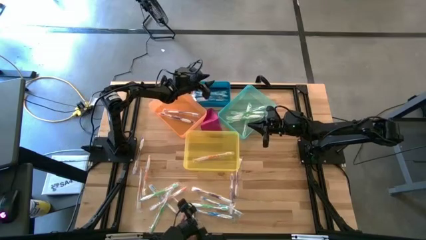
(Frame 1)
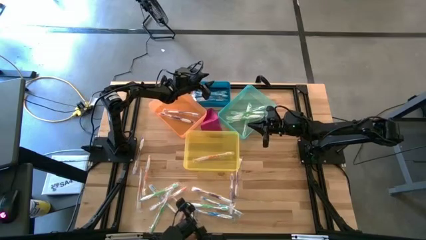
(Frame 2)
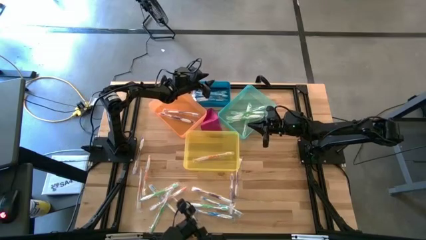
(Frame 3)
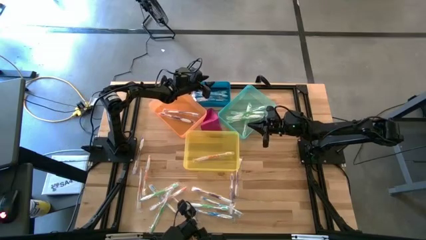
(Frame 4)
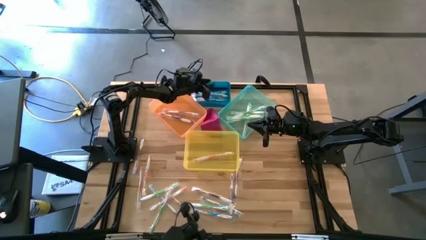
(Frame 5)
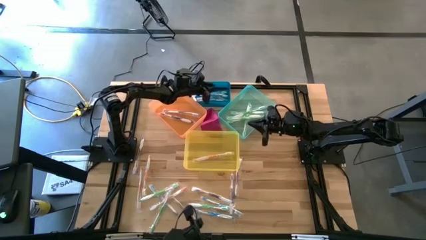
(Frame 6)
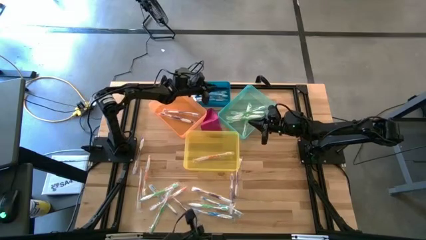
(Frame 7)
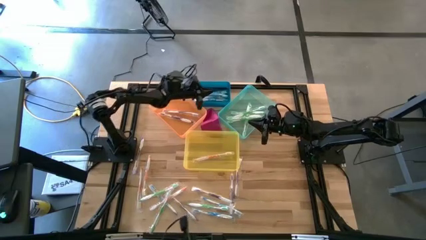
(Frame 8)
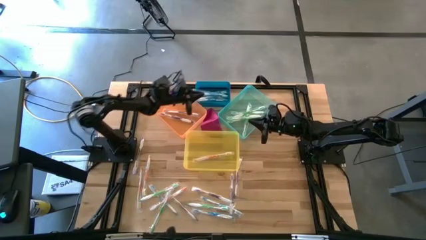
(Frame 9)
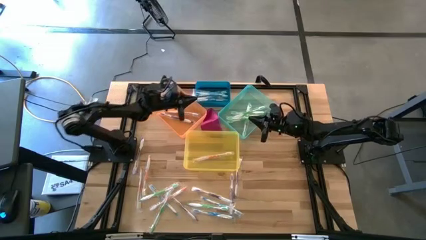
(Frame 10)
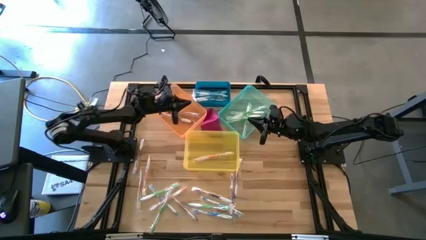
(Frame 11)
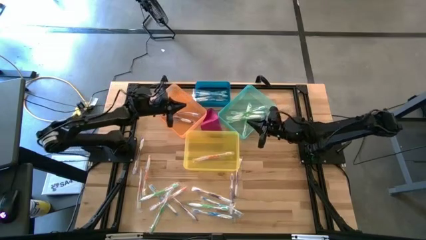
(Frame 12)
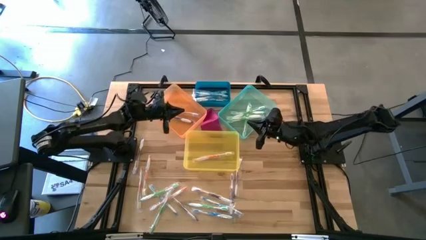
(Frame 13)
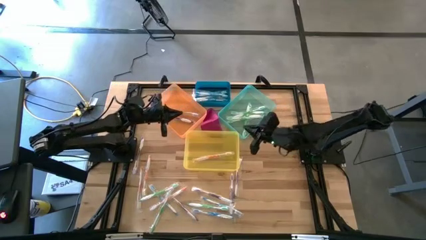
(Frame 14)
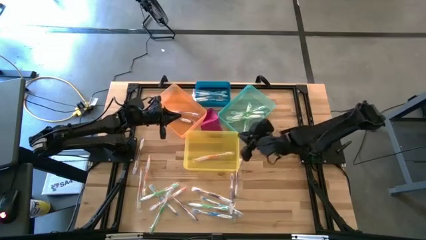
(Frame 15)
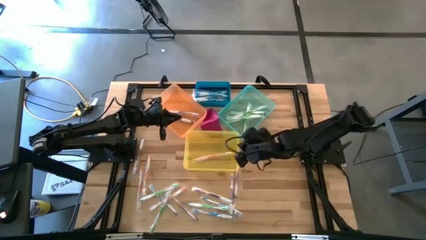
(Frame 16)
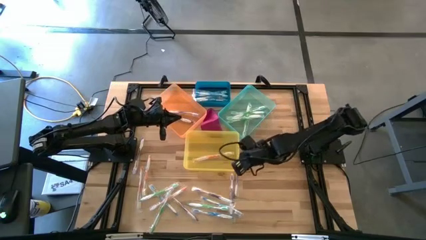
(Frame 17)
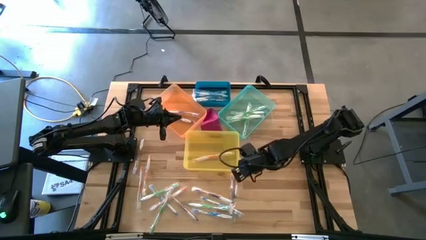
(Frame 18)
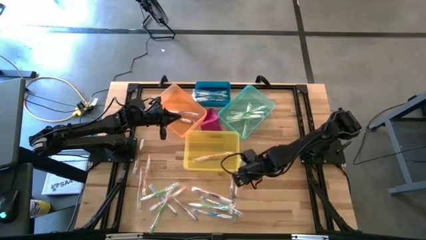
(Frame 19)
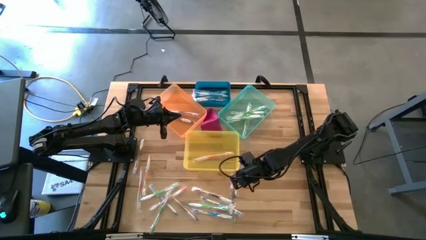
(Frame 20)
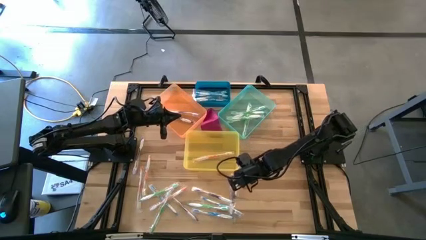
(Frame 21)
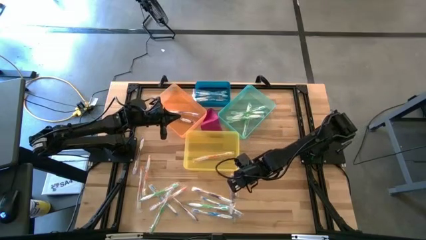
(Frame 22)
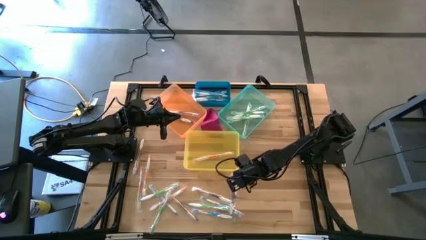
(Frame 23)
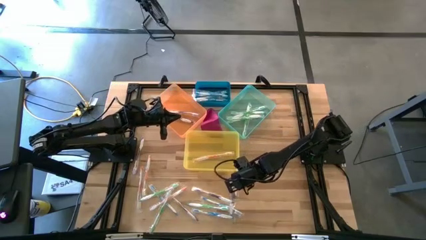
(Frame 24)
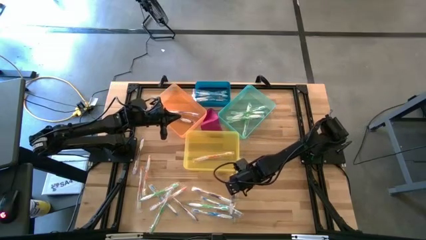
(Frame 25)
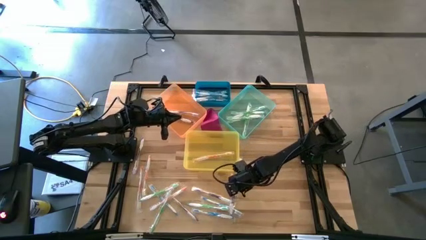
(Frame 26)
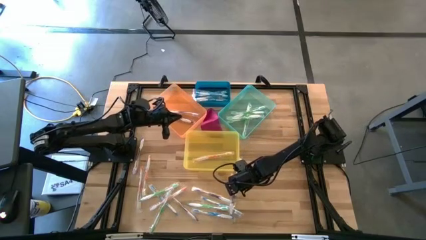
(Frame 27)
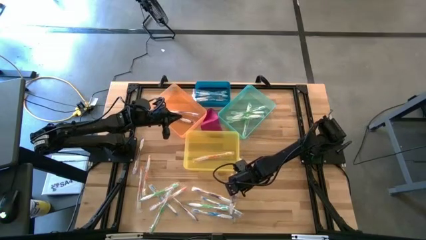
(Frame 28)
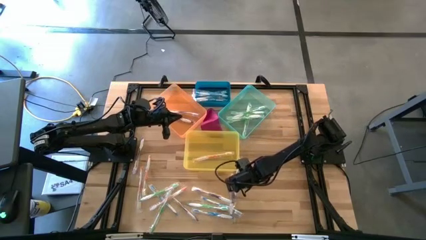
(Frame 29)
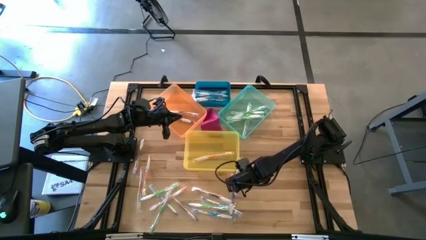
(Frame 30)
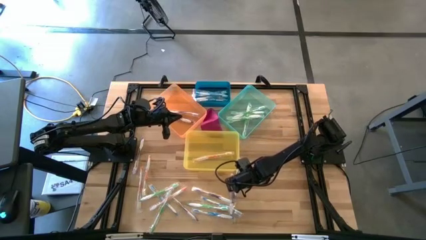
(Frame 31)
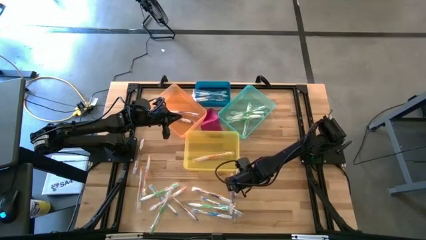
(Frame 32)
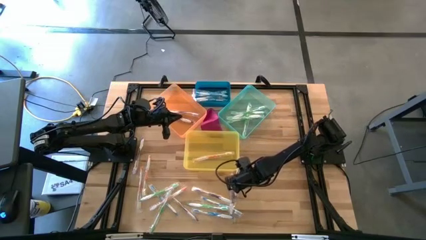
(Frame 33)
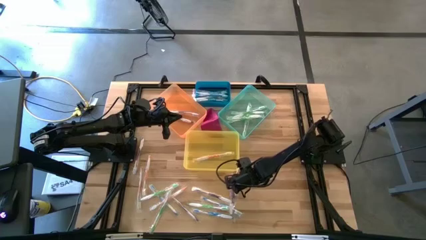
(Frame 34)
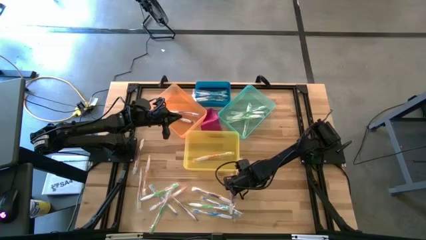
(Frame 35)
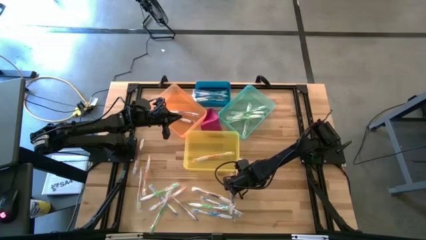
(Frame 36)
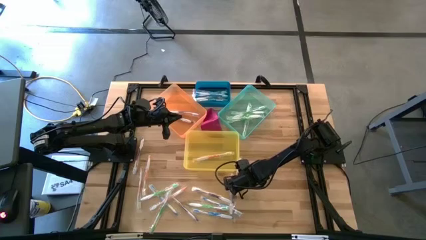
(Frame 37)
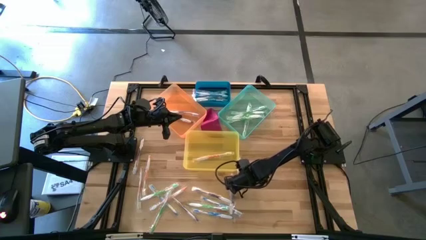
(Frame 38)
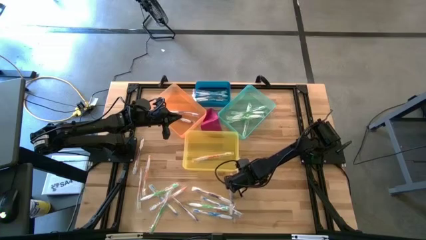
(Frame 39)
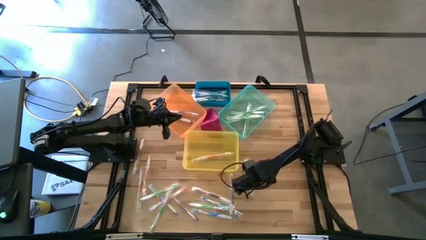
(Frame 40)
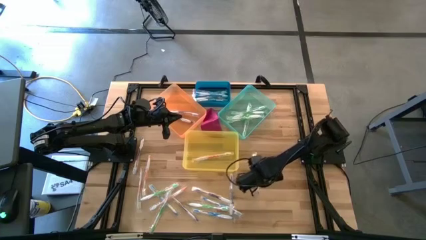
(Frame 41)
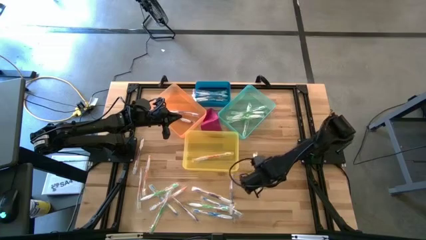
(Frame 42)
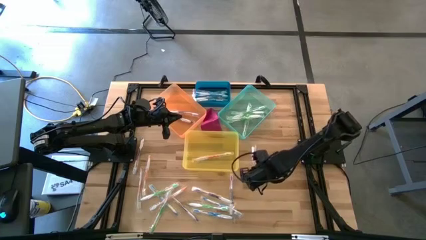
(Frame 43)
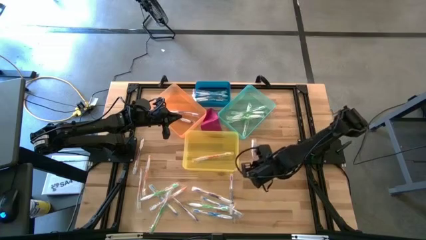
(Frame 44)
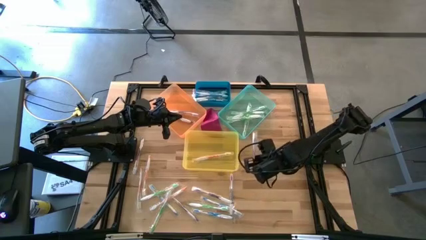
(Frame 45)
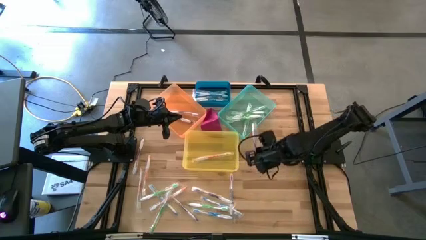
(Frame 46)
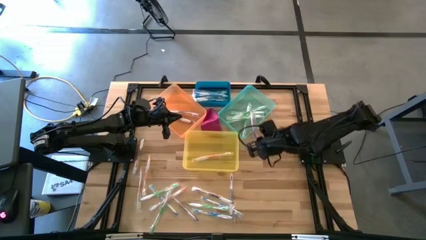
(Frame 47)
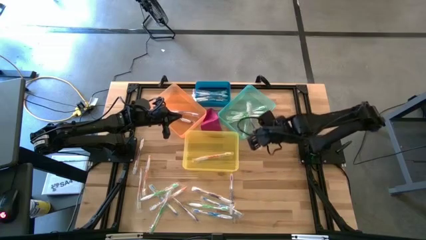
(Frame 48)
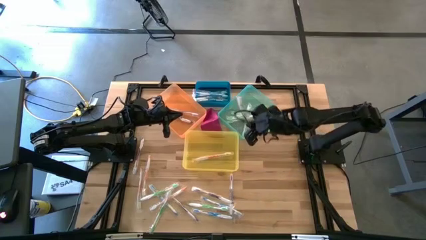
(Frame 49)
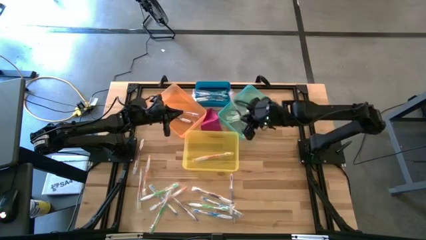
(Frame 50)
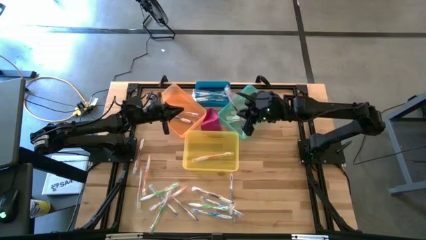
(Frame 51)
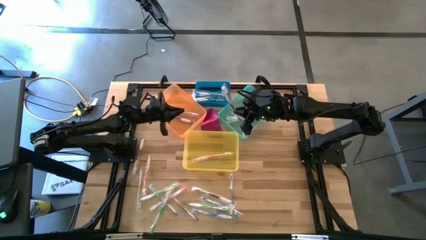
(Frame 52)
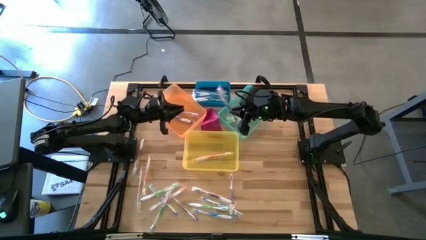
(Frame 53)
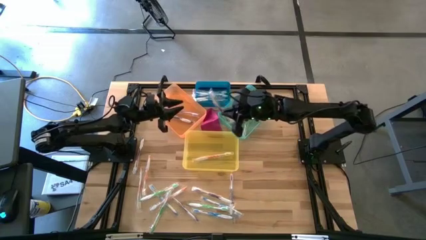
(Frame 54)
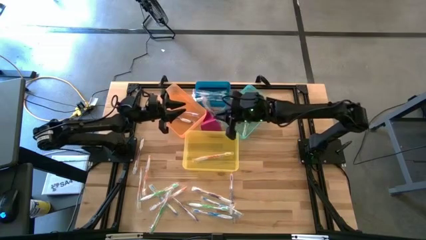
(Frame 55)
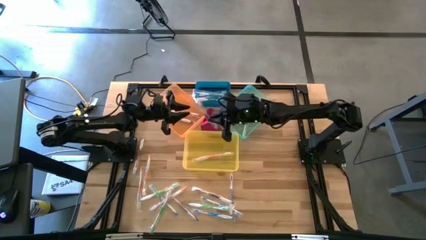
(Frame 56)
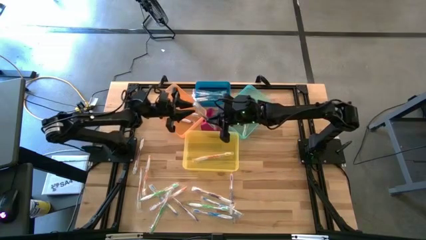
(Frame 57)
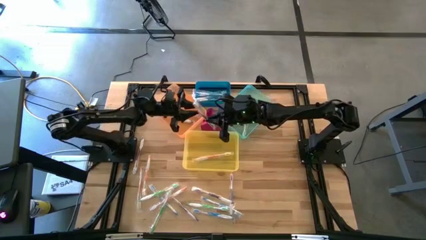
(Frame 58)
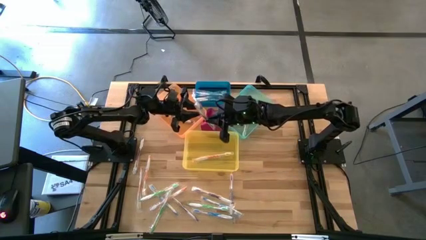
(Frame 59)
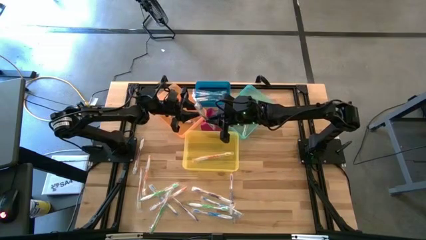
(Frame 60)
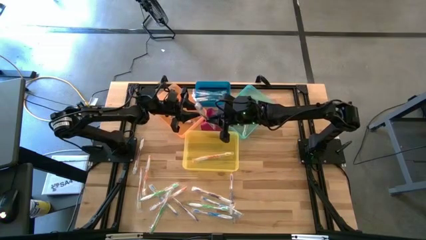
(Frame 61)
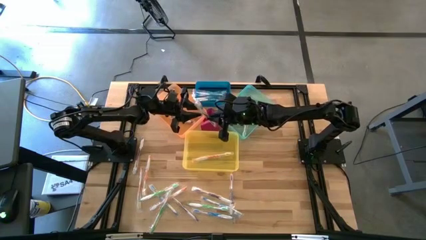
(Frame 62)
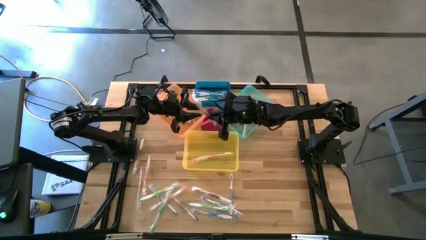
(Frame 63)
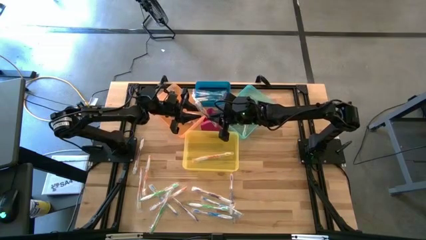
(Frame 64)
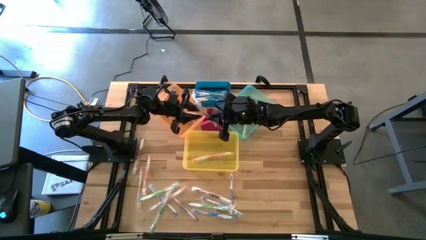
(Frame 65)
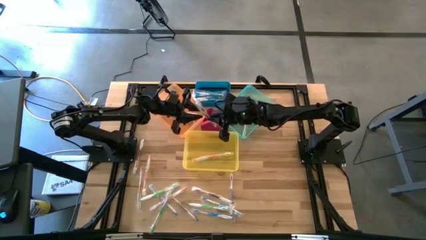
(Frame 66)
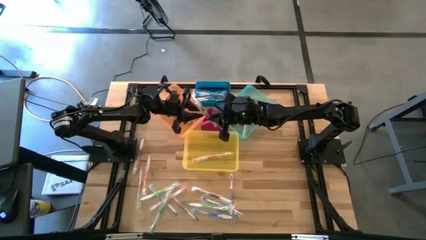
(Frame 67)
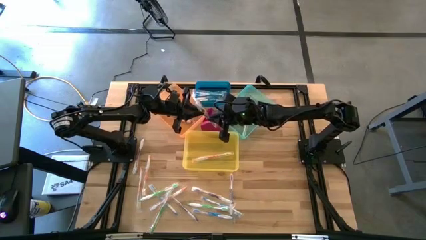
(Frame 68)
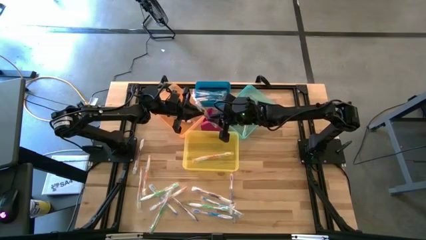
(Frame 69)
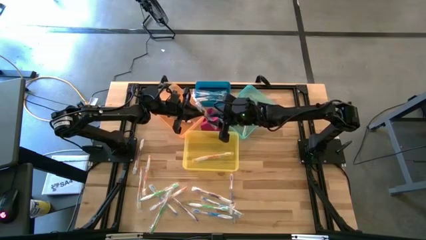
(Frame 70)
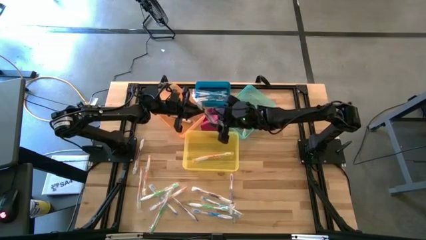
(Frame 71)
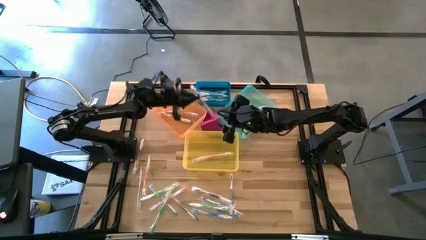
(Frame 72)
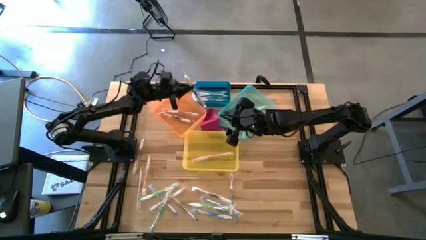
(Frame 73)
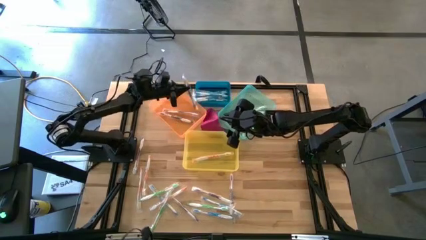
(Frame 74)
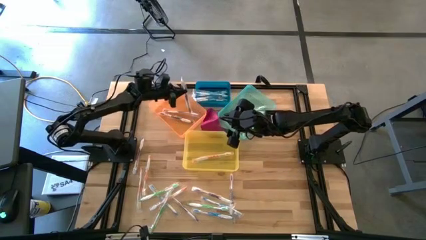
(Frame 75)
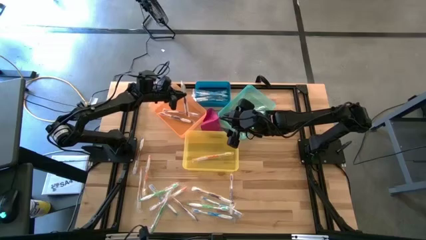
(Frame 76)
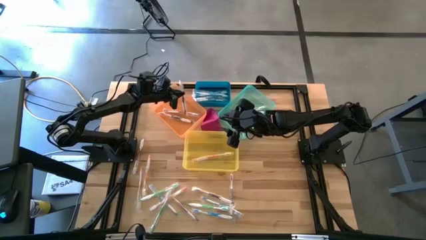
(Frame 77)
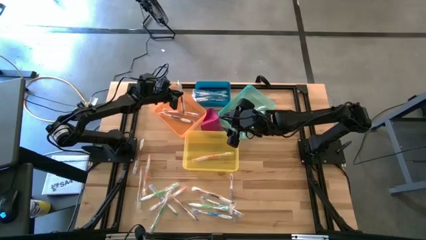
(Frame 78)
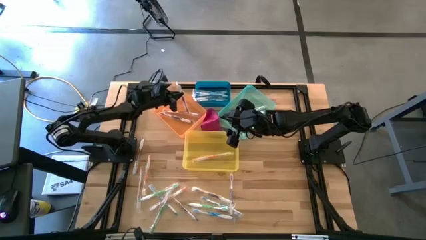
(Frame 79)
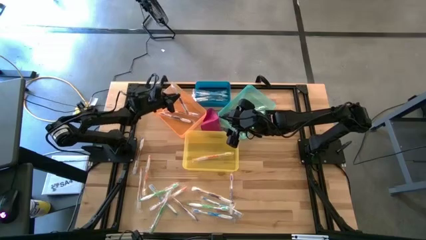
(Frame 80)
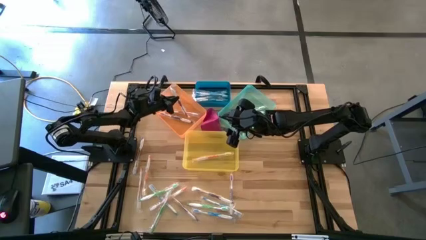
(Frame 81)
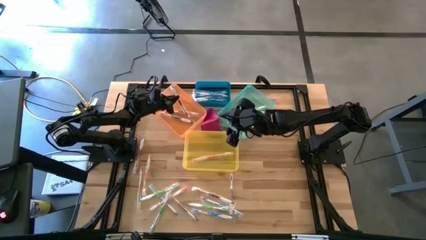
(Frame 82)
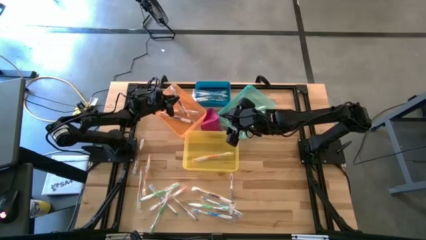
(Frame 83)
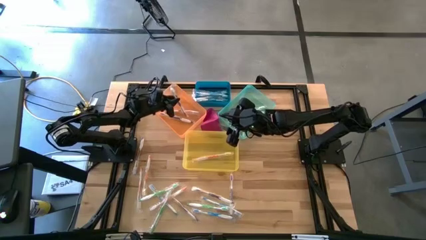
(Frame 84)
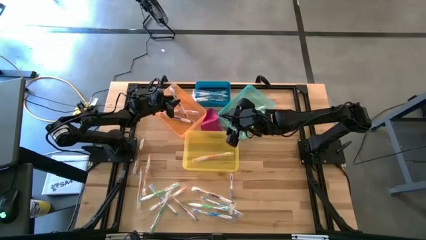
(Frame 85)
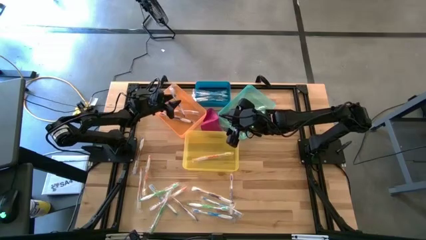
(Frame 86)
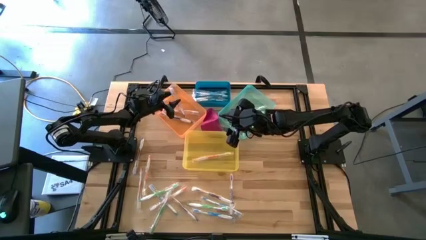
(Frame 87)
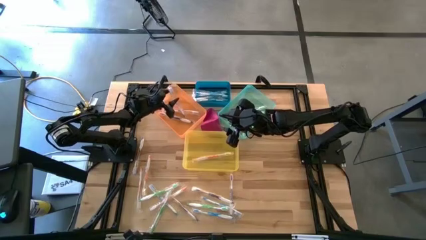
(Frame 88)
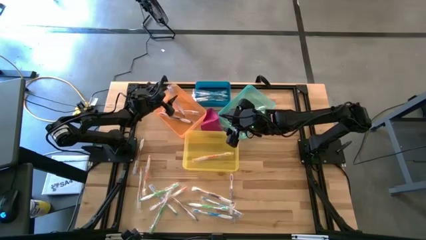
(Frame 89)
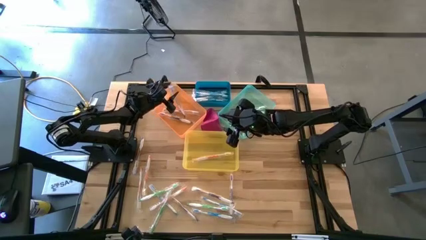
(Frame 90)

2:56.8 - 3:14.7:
Task: Pick & Place Toothbrushes
Put the purple toothbrush into the orange bin
